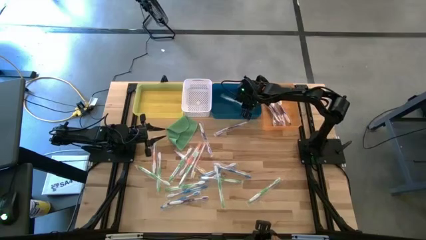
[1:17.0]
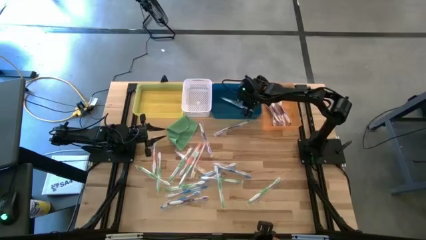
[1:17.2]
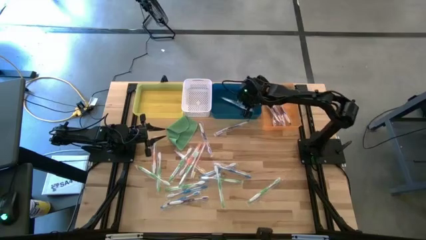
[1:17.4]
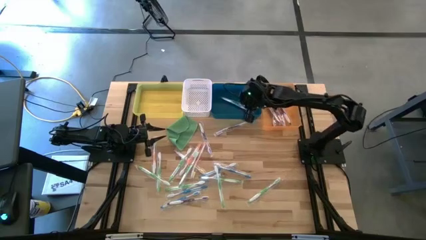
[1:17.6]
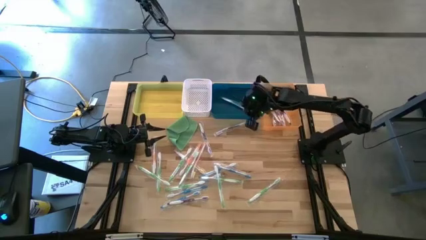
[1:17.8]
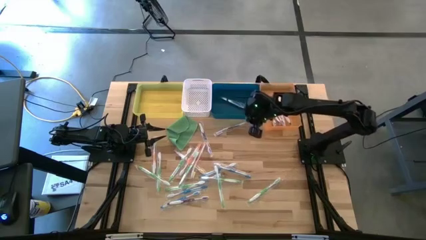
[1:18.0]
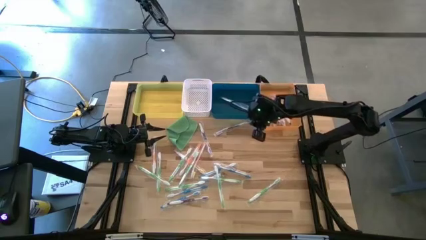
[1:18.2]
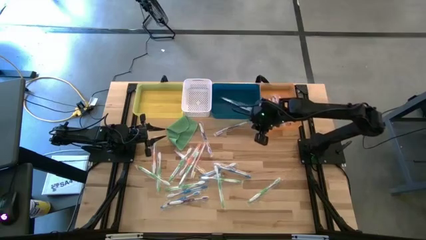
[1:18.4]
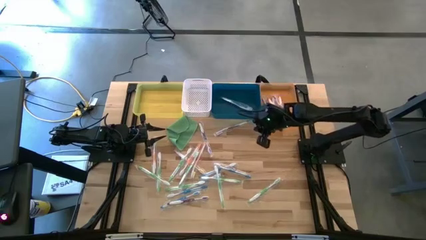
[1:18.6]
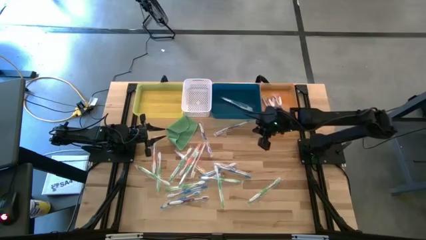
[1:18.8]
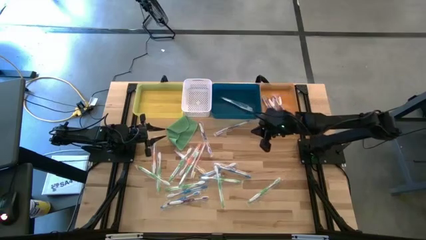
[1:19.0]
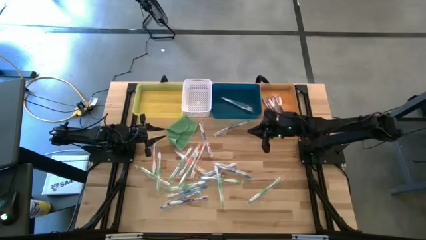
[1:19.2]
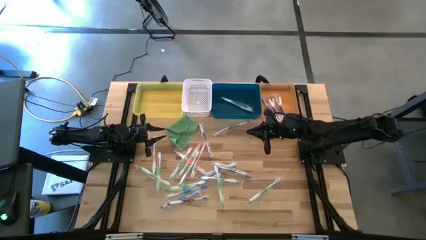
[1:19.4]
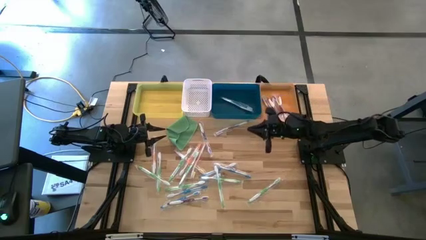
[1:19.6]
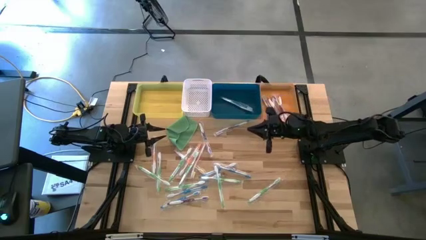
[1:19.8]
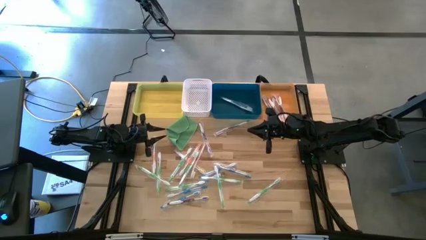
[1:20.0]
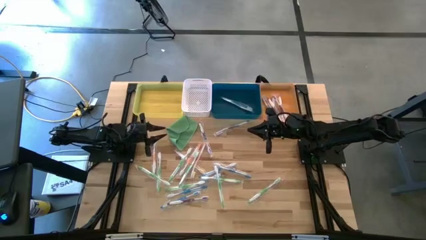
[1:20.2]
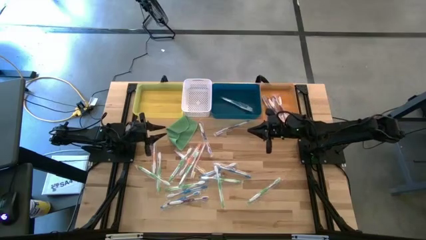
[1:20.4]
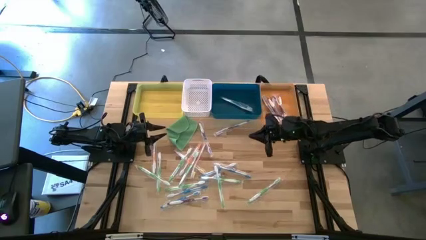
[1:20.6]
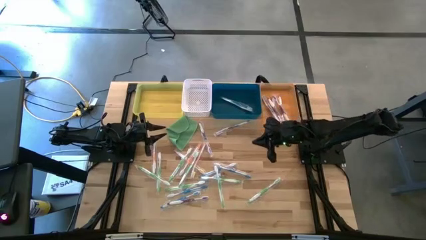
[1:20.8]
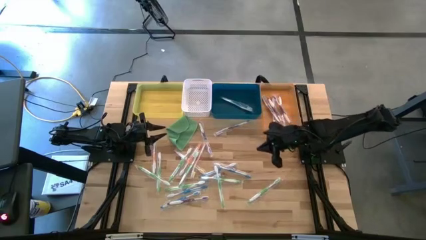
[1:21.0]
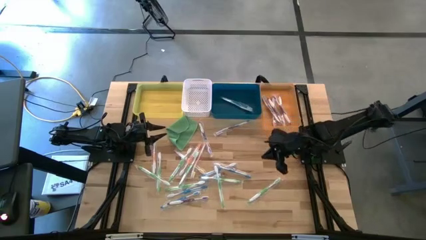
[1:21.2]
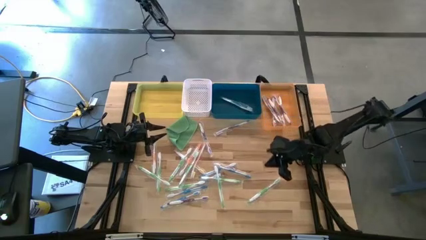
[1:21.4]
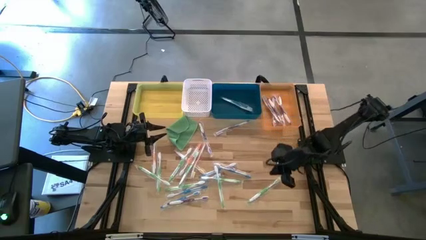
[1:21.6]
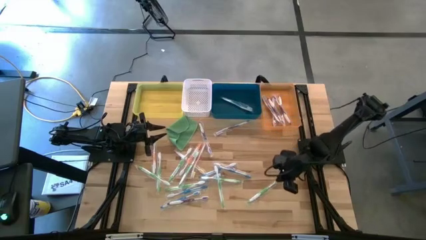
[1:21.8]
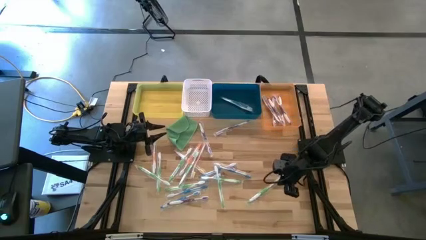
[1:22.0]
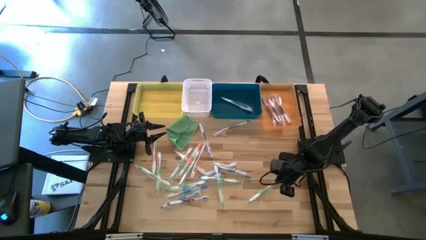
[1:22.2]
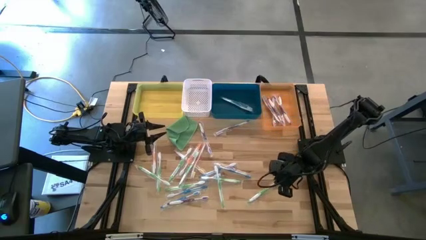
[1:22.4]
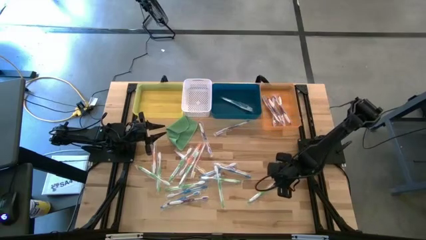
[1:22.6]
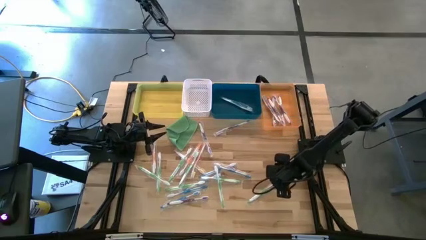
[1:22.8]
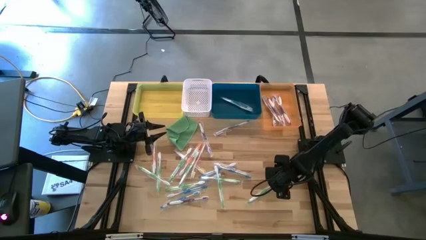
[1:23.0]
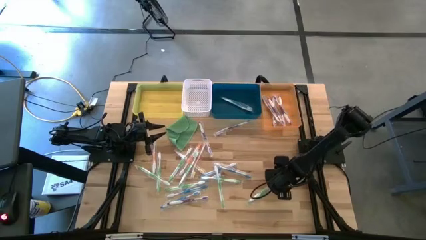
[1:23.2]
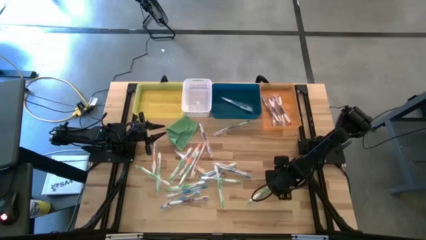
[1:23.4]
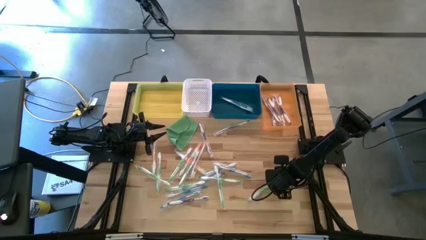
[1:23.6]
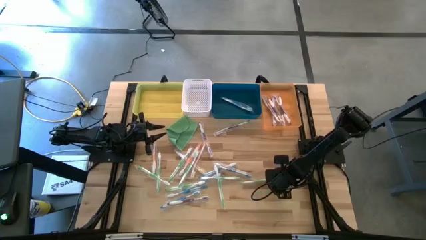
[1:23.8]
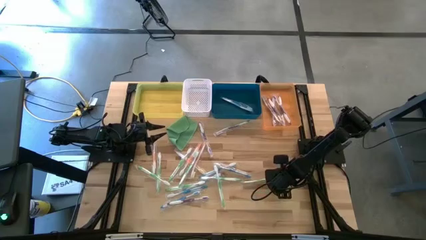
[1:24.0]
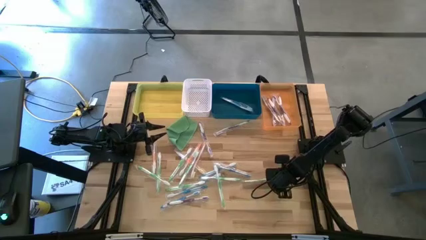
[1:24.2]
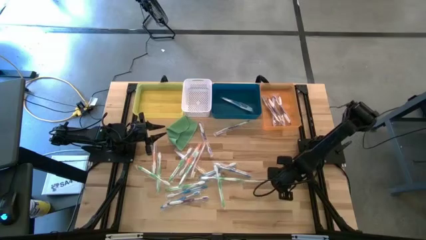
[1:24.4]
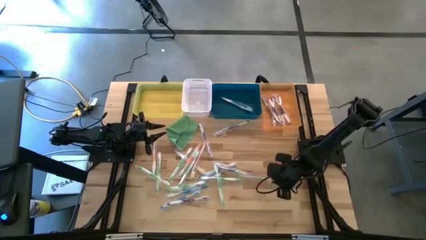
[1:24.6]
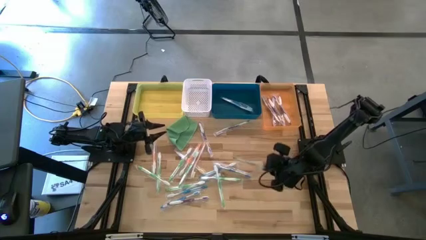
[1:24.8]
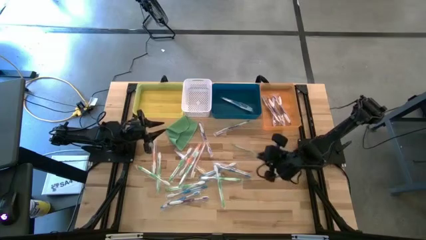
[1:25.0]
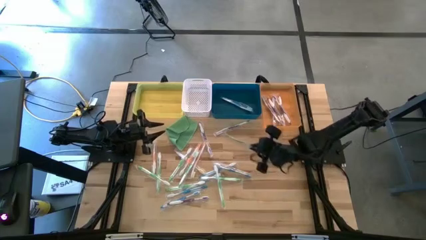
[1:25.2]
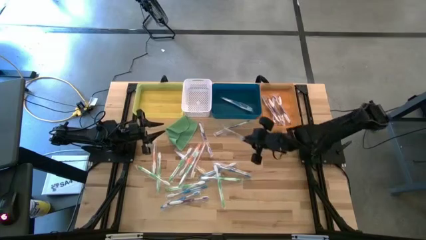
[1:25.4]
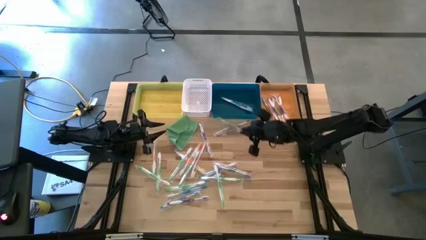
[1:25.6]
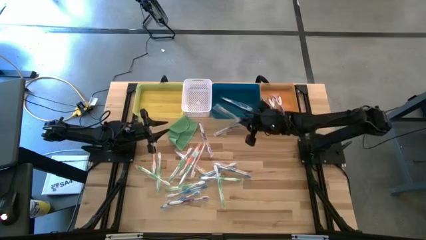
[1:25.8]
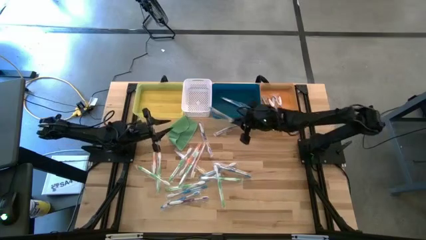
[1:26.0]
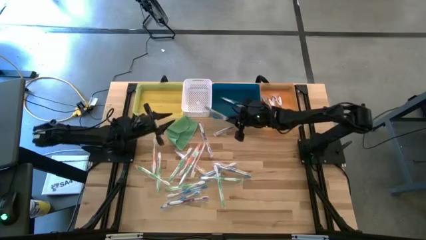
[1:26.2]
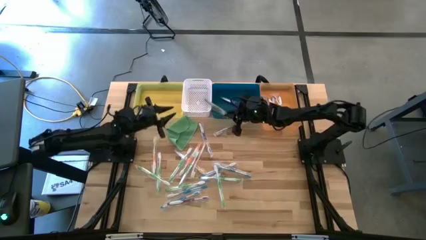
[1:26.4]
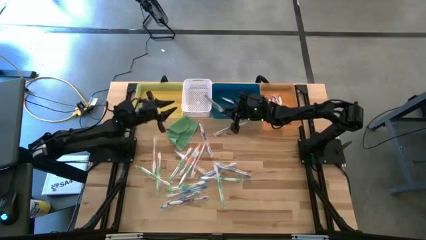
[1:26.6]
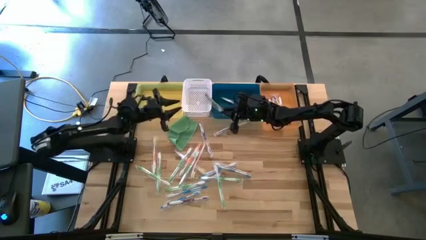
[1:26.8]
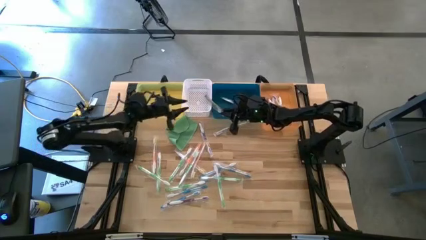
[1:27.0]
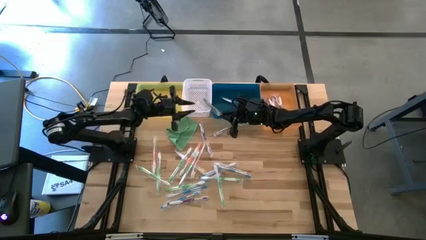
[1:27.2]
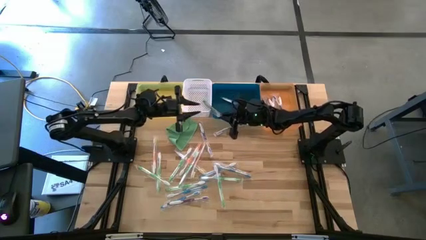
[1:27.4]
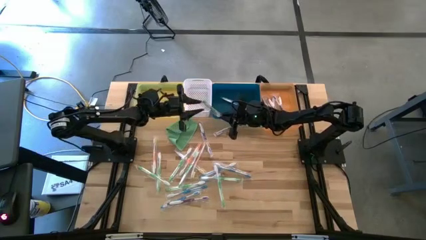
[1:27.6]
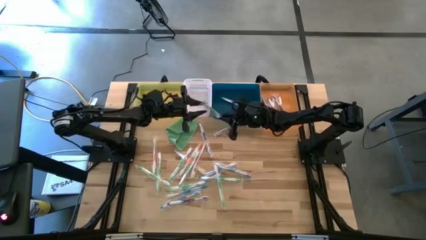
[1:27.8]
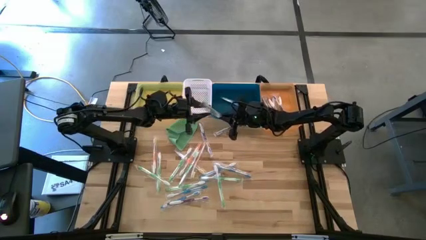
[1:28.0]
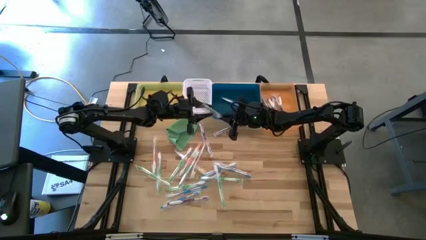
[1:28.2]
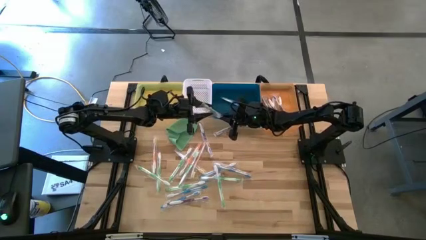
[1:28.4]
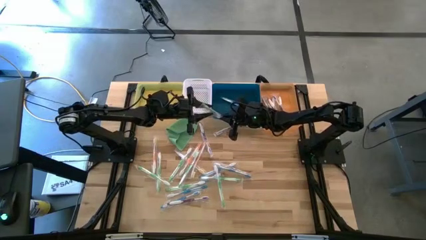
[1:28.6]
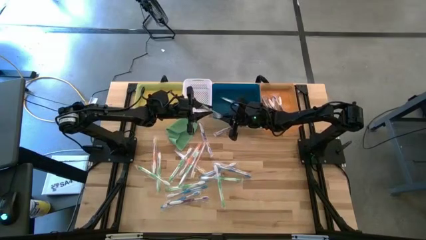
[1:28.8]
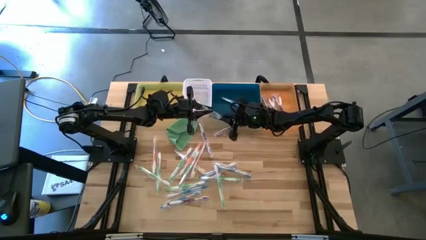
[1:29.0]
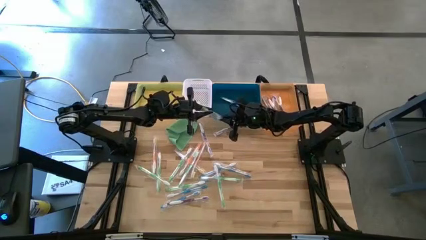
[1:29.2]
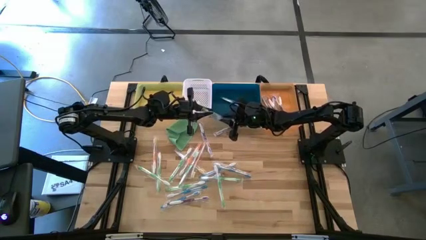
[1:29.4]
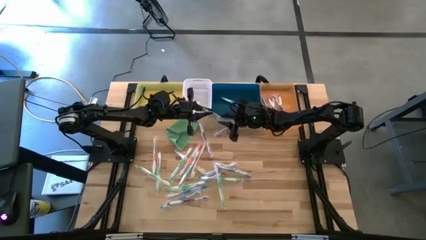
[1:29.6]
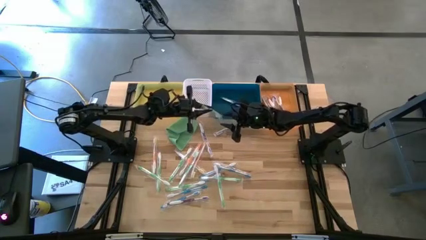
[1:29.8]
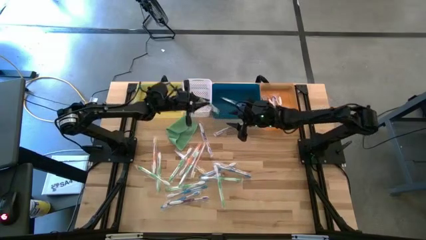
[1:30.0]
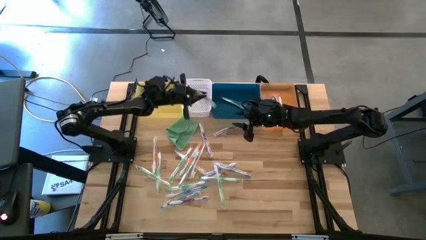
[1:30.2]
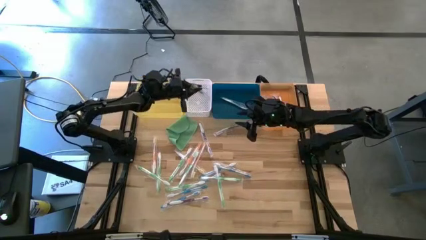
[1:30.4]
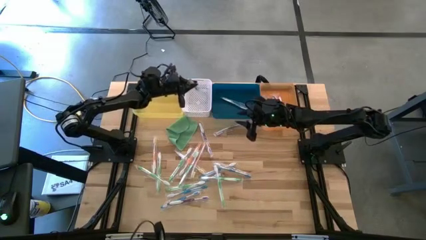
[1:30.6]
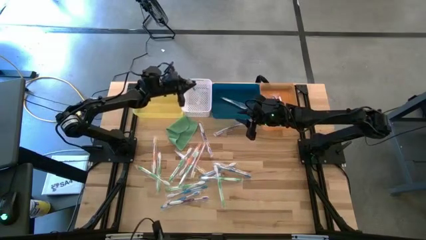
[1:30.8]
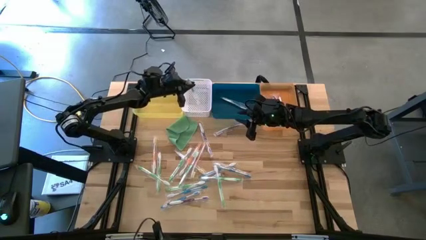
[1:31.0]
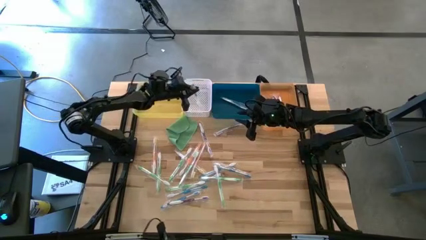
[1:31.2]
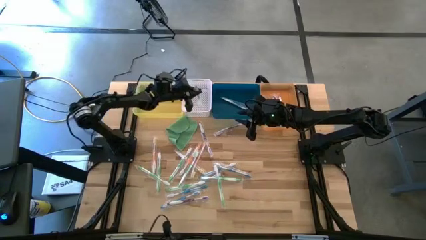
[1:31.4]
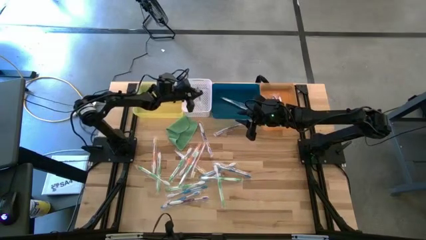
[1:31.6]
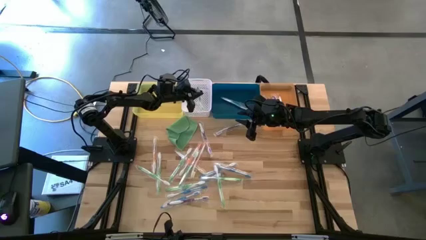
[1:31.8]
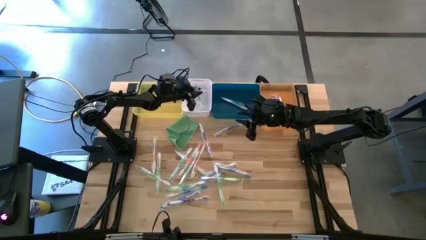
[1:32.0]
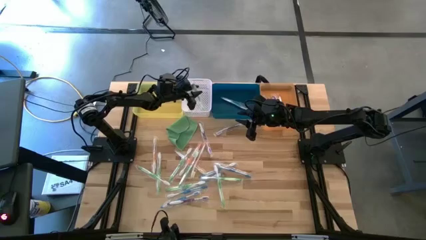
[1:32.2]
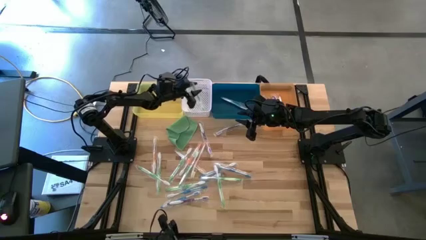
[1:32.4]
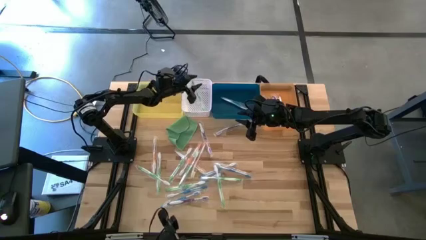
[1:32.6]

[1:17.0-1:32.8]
Task: Pick & Place Toothbrushes
Put the green toothbrush into the white bin
